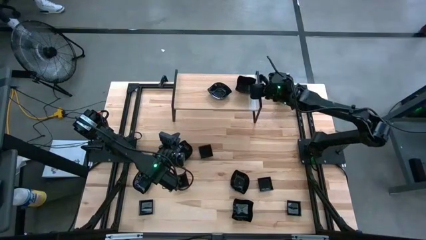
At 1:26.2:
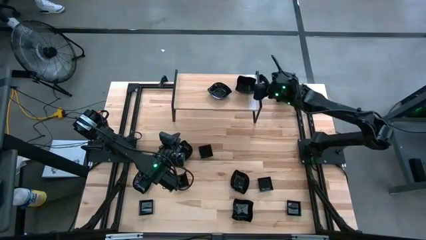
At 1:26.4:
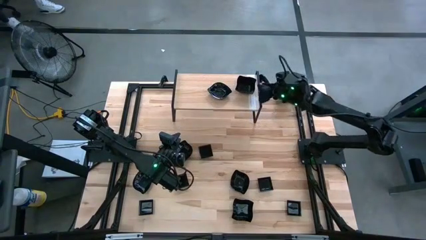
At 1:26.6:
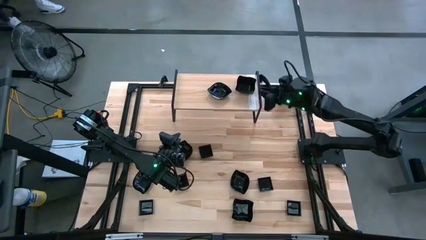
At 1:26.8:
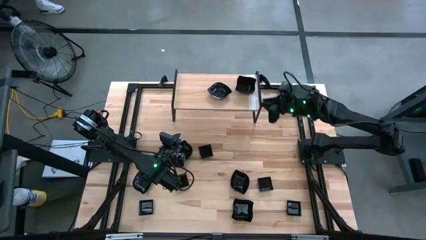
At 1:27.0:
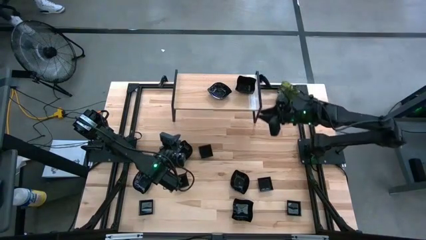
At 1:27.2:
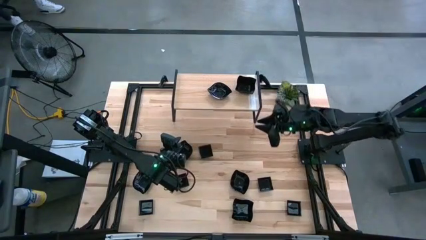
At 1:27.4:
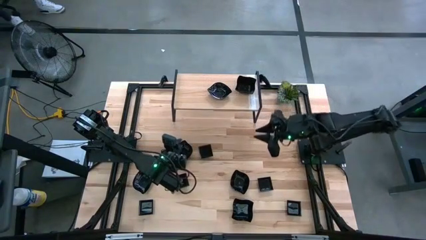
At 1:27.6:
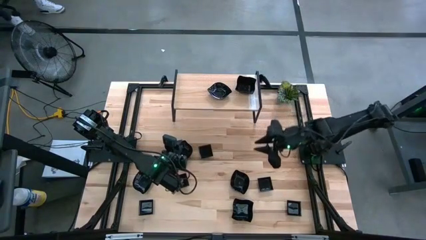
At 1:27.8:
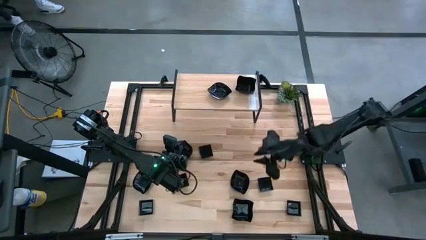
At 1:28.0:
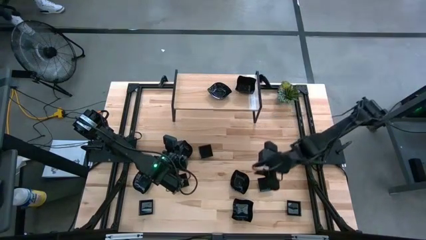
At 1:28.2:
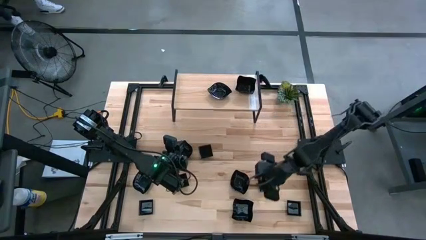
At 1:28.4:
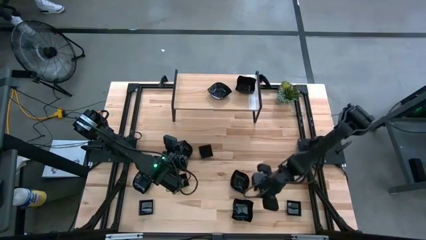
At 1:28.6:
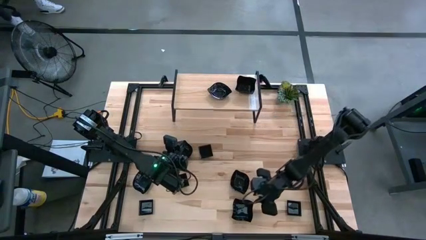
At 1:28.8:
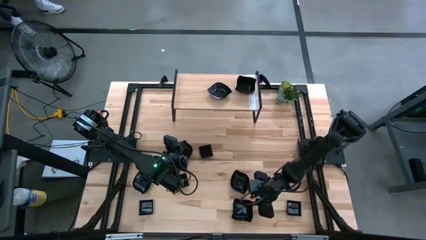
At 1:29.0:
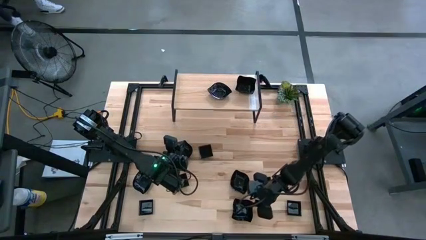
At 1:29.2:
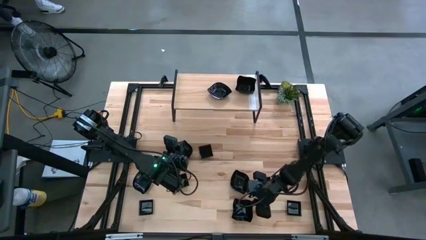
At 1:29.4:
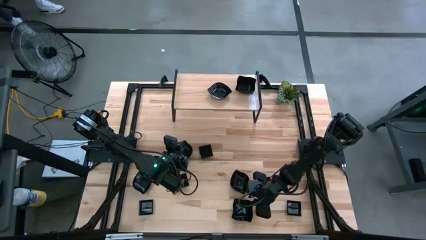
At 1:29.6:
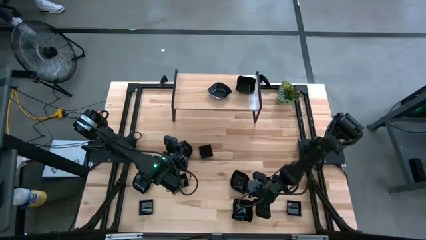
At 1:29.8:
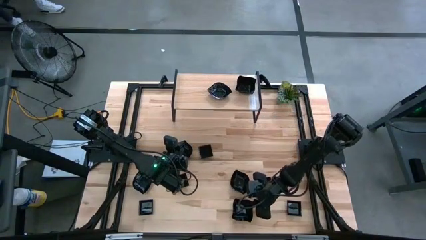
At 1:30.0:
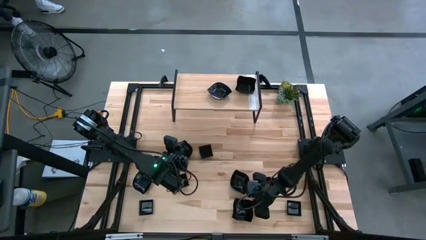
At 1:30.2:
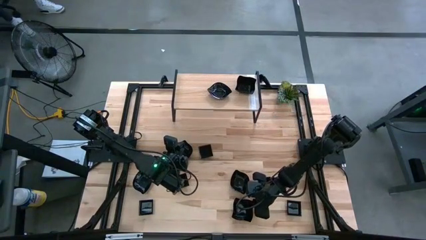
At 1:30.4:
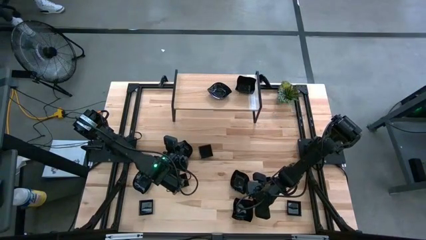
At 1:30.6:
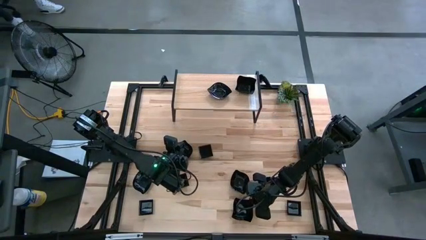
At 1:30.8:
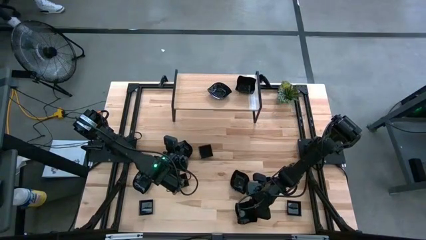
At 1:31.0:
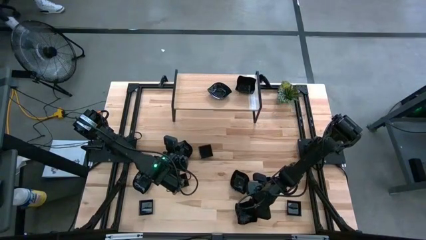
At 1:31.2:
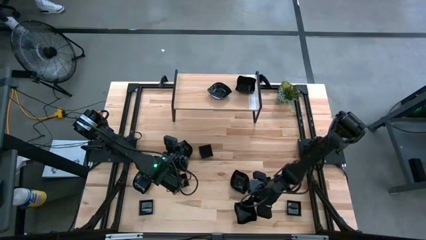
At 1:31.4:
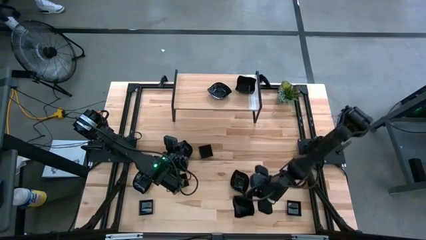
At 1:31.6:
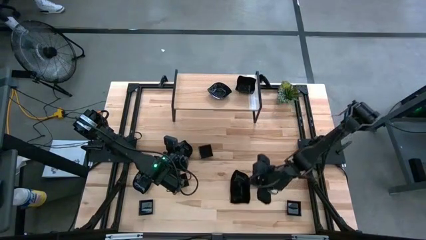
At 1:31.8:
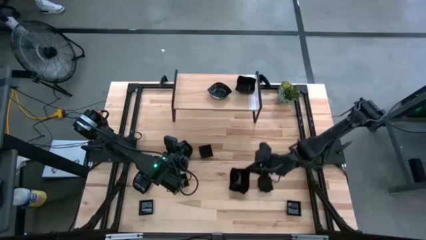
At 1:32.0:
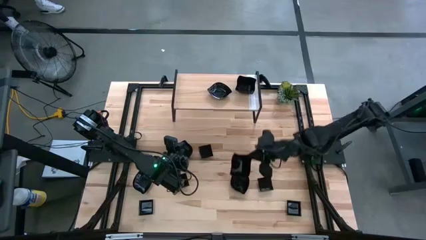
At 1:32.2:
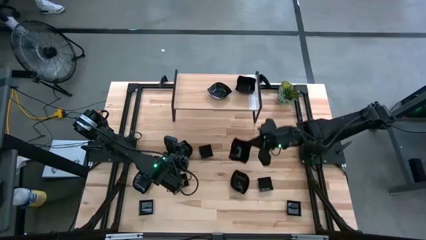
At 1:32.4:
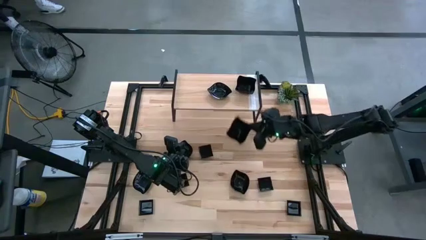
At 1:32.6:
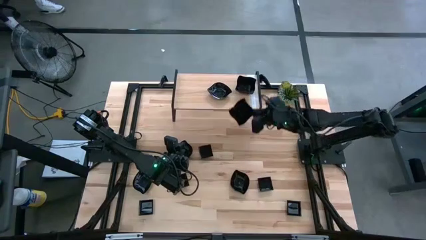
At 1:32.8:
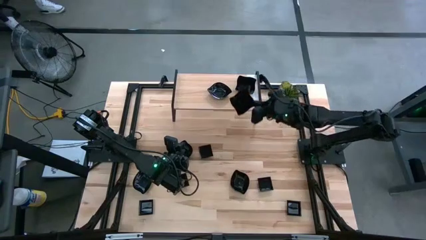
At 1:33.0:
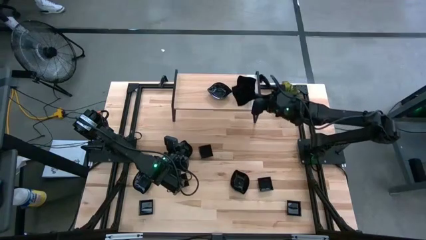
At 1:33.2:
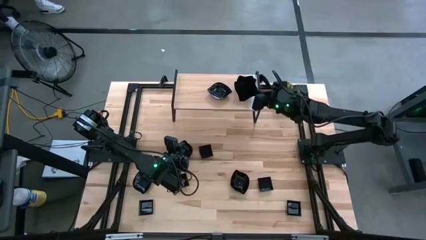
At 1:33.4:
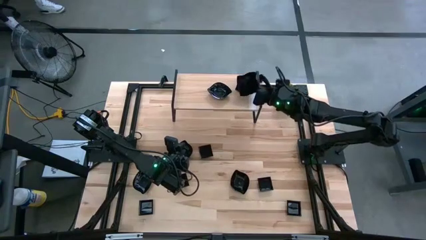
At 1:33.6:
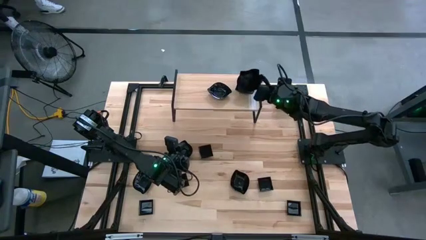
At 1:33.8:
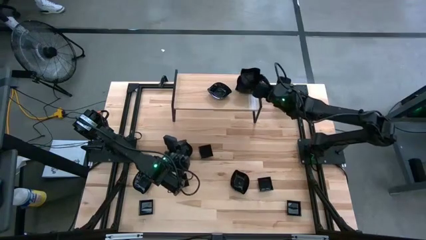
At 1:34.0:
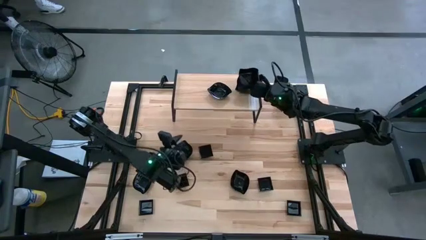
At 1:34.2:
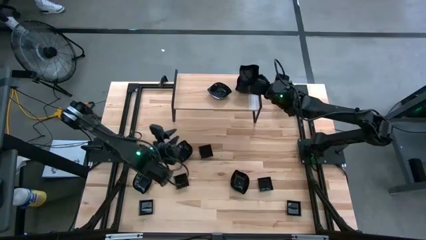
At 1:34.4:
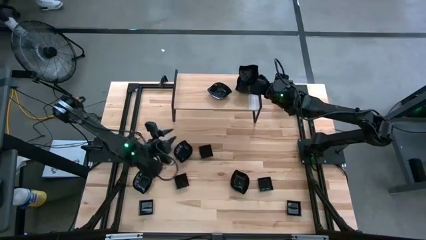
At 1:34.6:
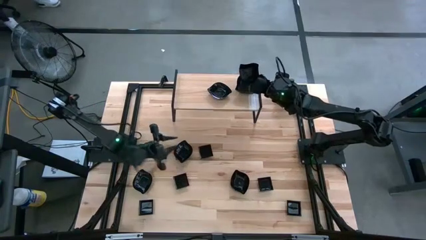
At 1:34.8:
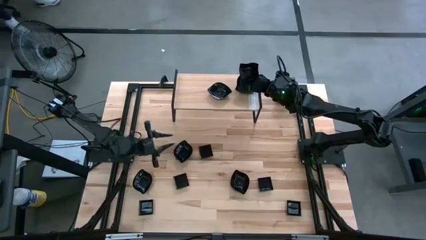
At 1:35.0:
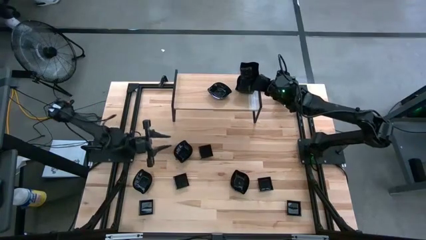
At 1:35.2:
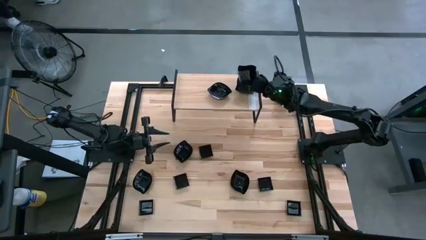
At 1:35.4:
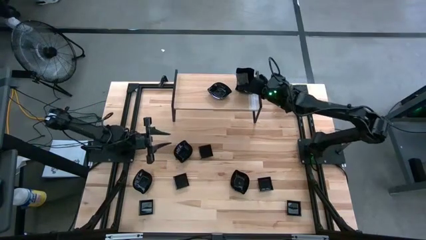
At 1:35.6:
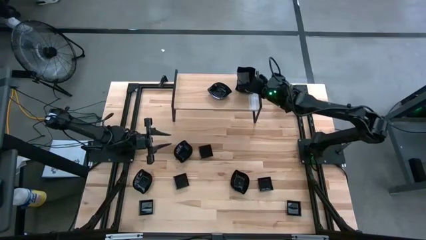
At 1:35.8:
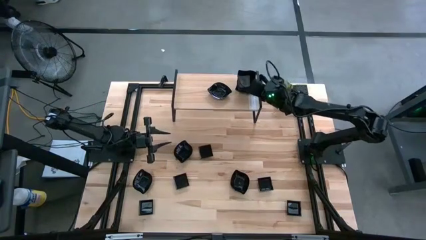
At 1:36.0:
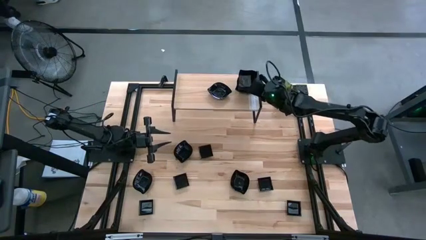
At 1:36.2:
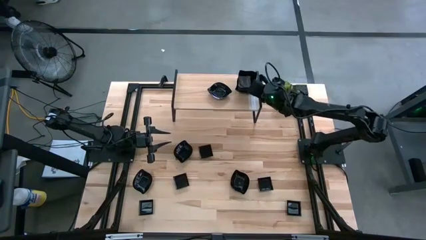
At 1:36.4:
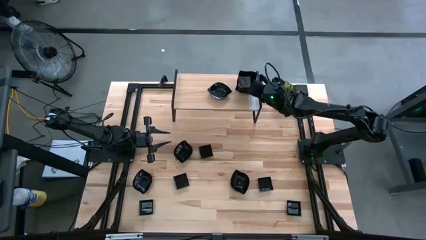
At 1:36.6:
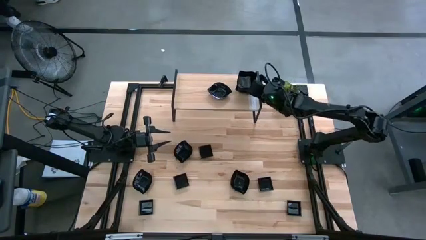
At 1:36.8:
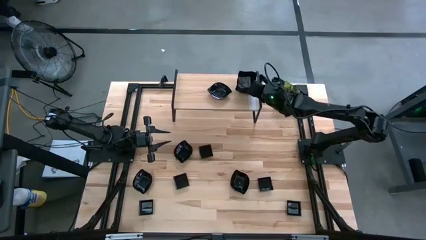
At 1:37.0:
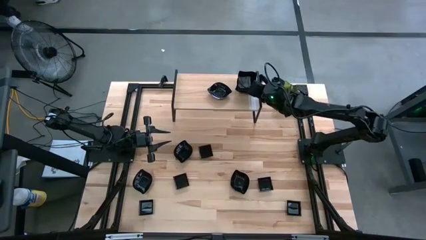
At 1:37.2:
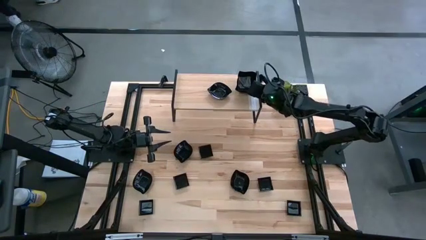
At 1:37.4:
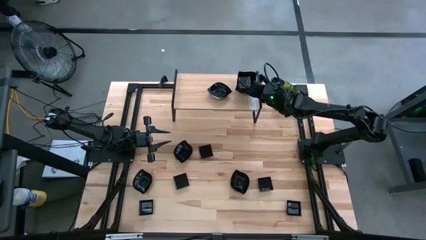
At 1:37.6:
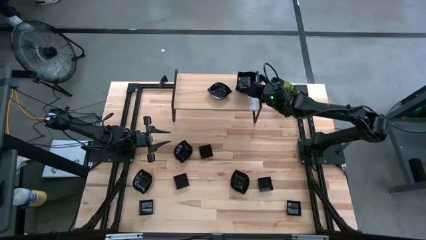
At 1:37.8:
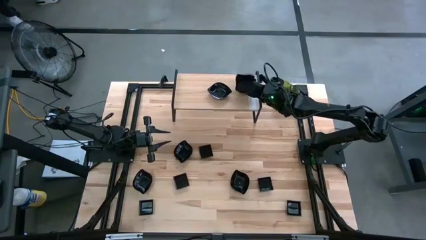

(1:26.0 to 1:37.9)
Task: Pick & Place Mini shaped plates
Stack the distorted square plate on top of the other distorted square plates on the shelf

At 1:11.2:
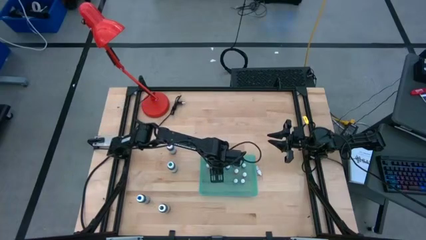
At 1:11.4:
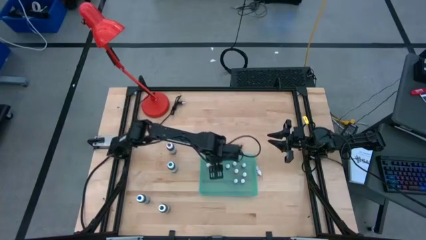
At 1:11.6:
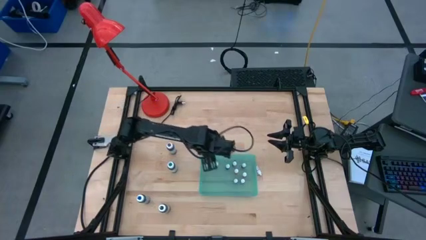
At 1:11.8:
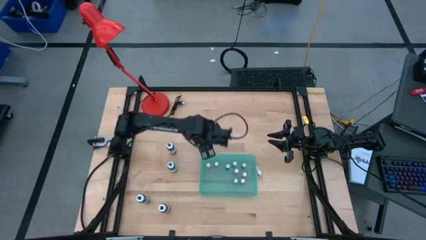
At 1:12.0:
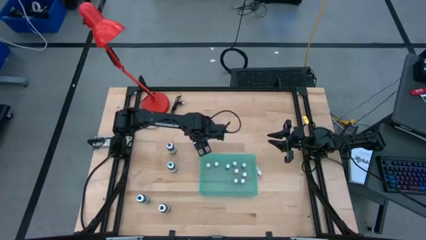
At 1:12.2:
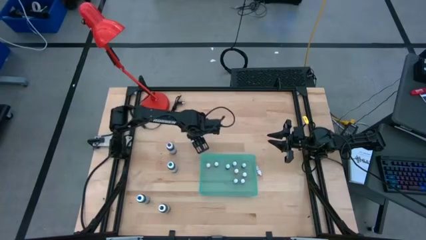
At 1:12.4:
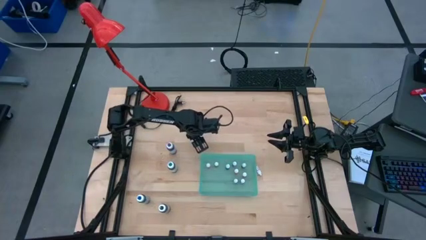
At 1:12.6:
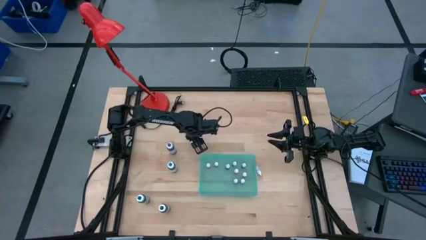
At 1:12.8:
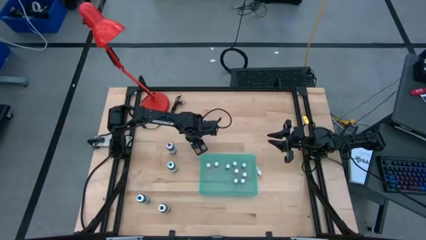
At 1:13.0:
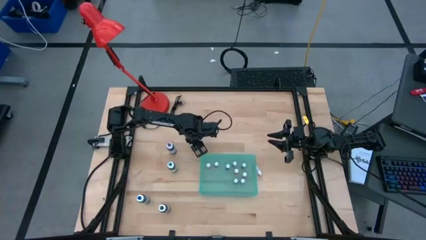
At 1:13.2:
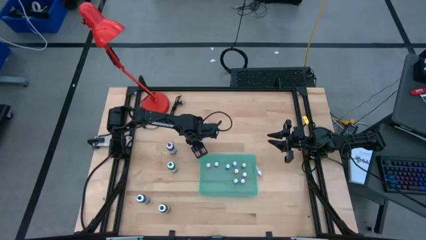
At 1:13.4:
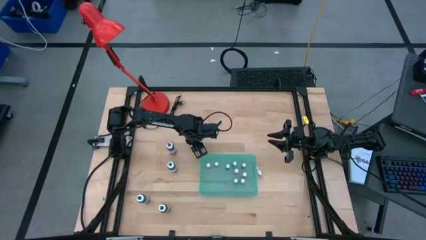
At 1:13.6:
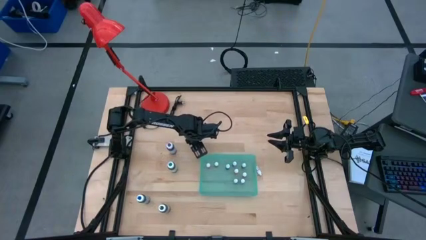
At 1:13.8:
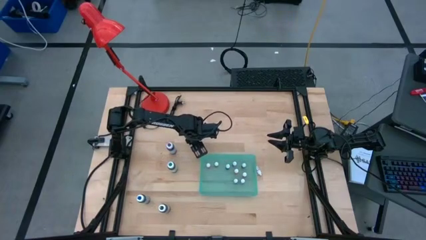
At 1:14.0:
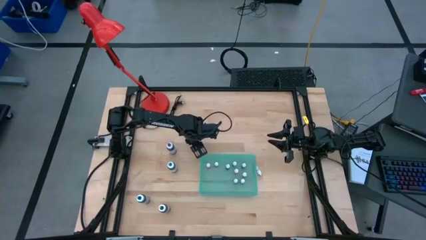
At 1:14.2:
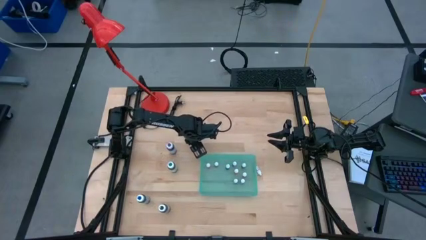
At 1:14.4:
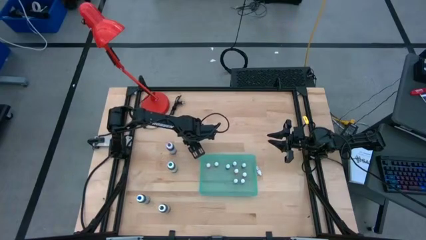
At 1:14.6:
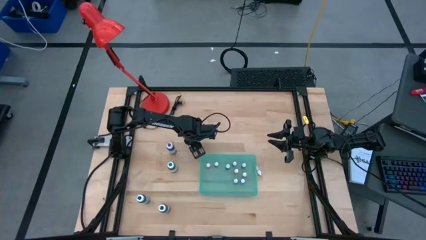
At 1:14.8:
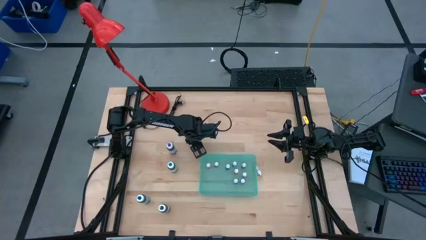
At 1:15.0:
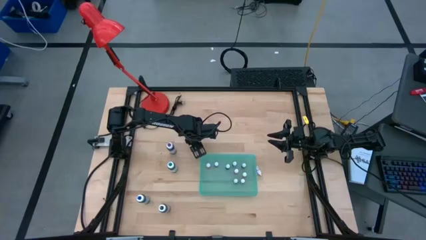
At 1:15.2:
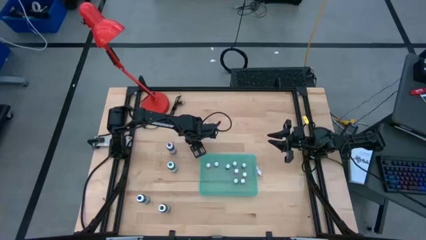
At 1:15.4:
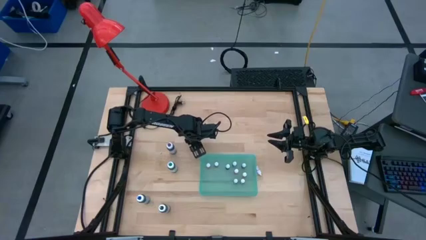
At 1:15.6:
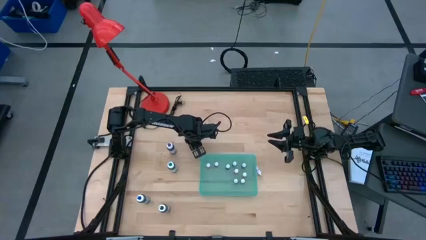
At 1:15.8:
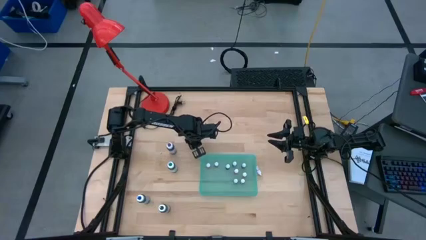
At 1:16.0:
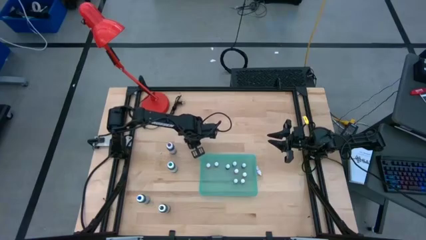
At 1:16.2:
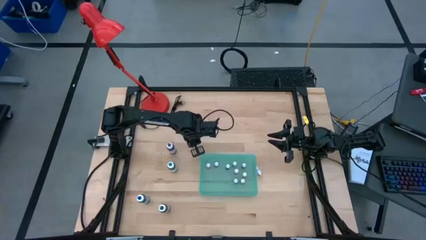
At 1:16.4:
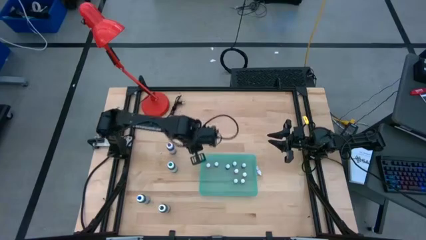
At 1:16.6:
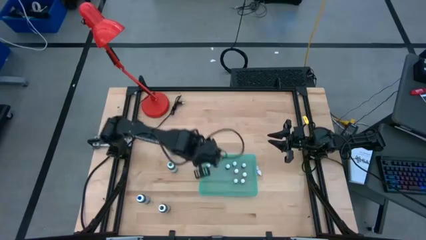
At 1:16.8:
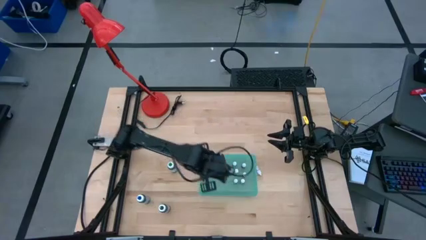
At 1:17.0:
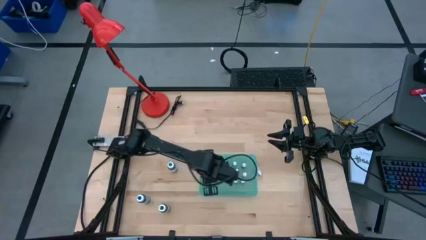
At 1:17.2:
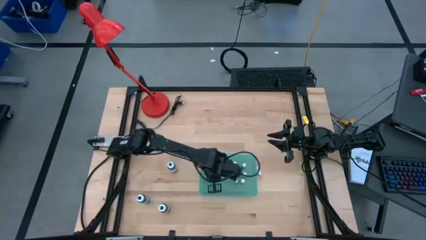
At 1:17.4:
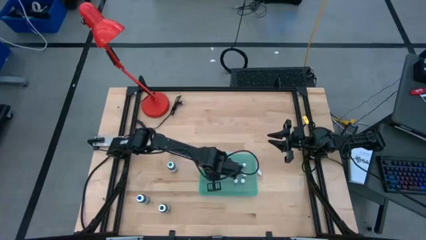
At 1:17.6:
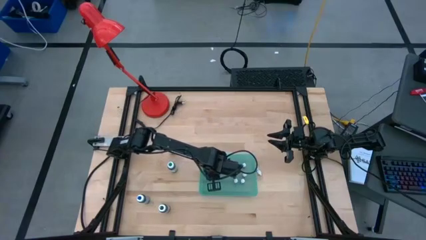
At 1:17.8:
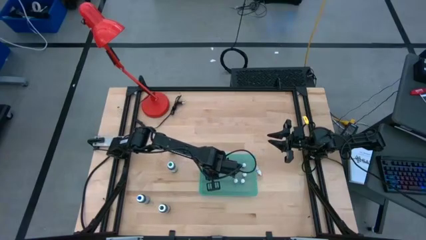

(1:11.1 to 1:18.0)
Task: Pick & Place food coloring
Put the small black food coloring bottle into the green bin
